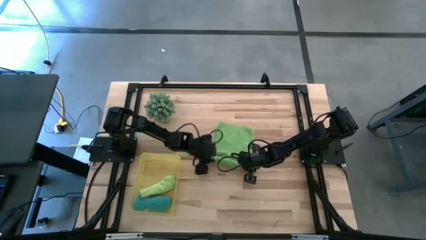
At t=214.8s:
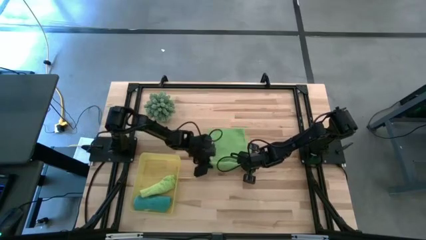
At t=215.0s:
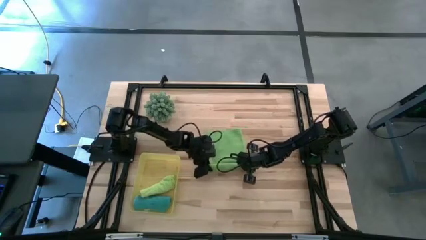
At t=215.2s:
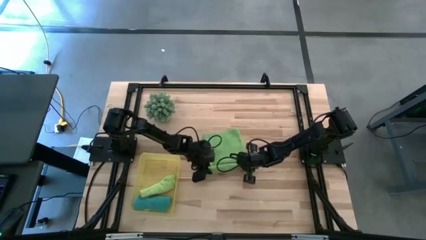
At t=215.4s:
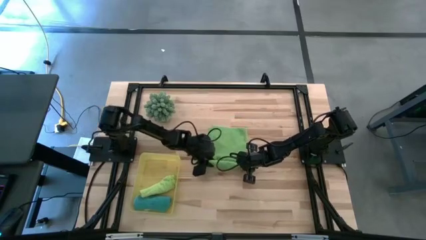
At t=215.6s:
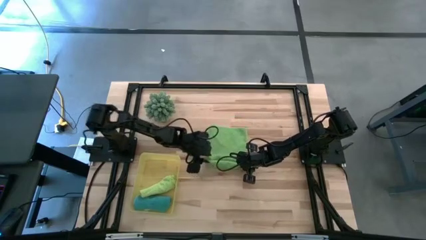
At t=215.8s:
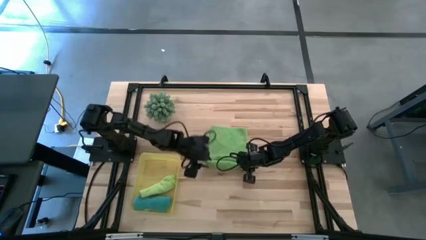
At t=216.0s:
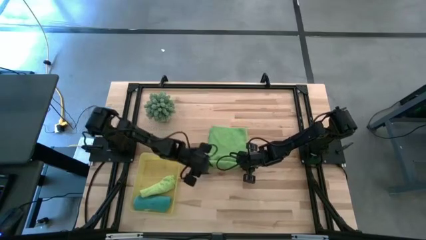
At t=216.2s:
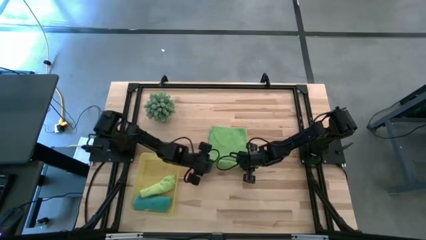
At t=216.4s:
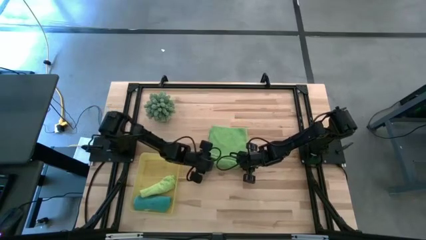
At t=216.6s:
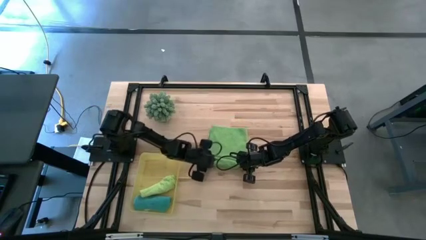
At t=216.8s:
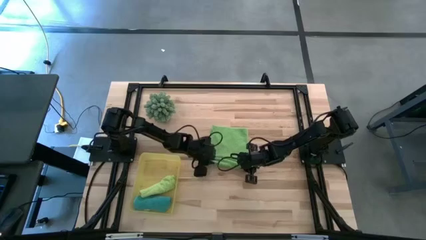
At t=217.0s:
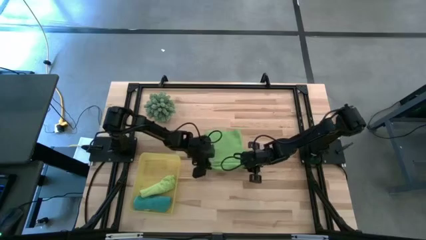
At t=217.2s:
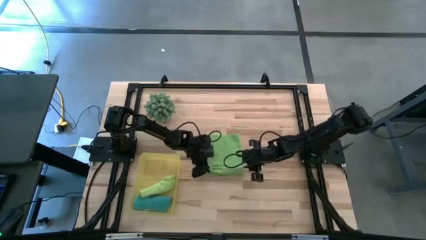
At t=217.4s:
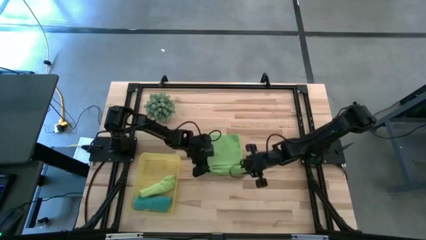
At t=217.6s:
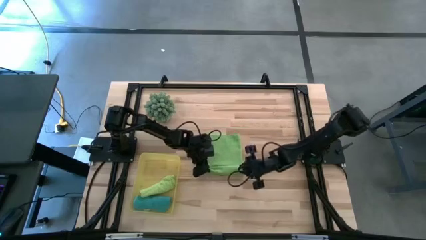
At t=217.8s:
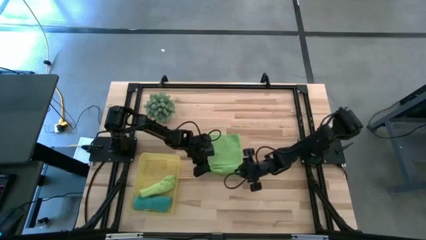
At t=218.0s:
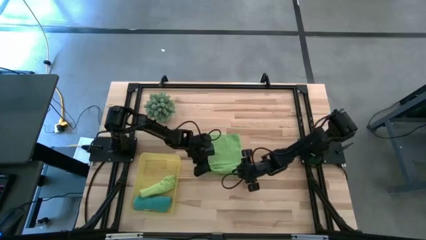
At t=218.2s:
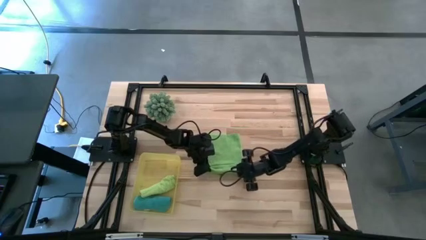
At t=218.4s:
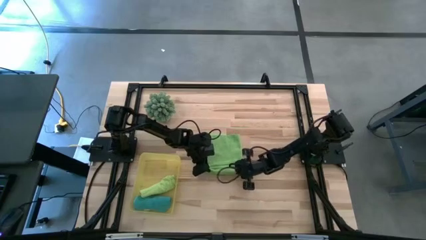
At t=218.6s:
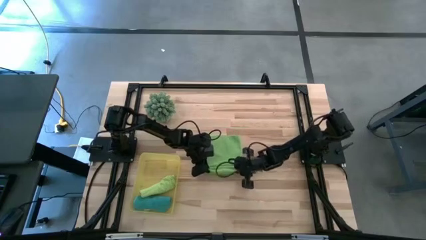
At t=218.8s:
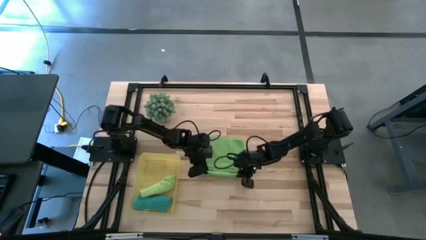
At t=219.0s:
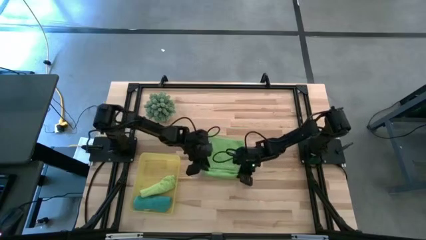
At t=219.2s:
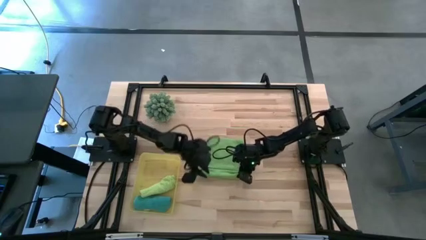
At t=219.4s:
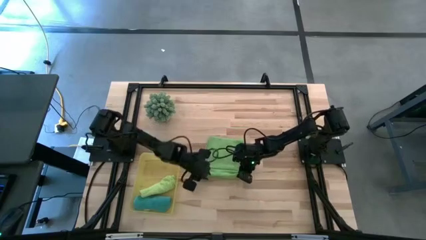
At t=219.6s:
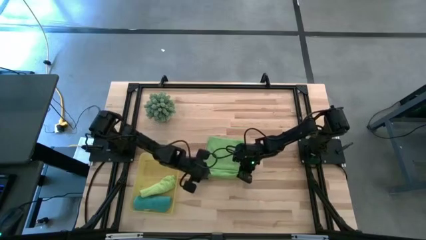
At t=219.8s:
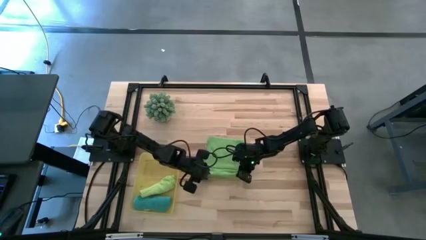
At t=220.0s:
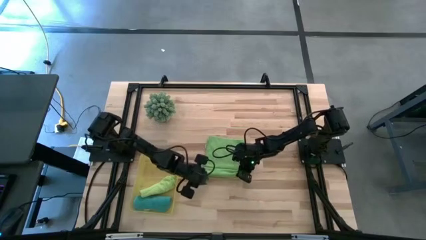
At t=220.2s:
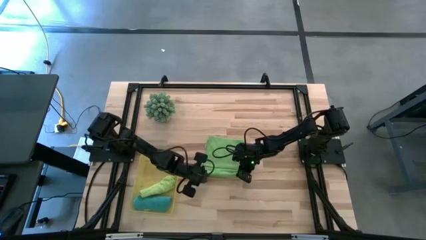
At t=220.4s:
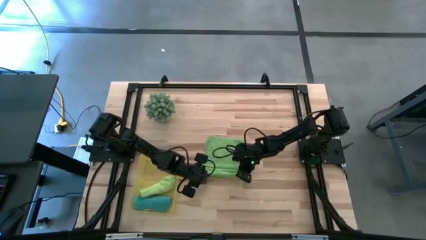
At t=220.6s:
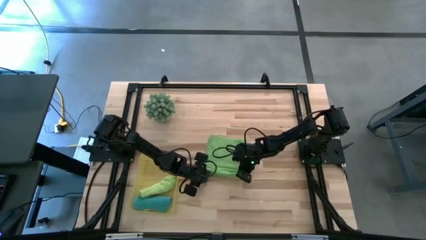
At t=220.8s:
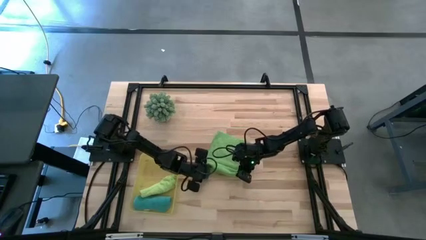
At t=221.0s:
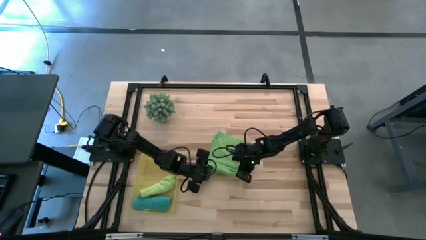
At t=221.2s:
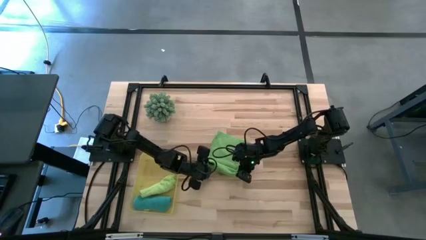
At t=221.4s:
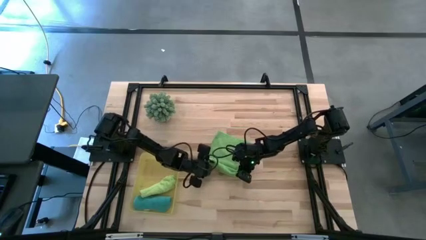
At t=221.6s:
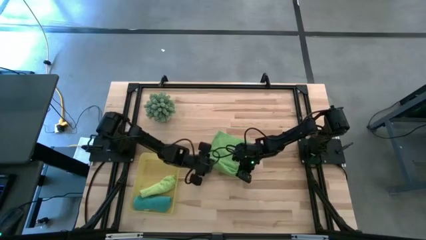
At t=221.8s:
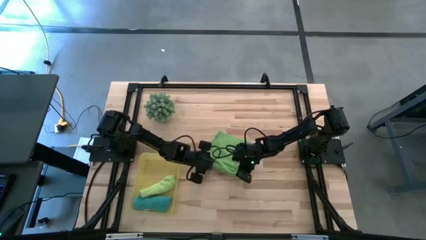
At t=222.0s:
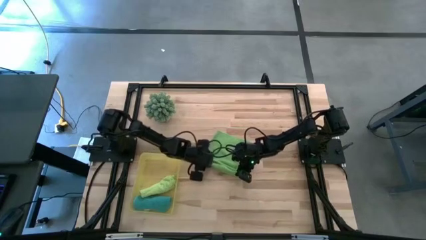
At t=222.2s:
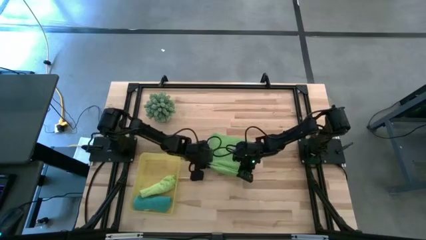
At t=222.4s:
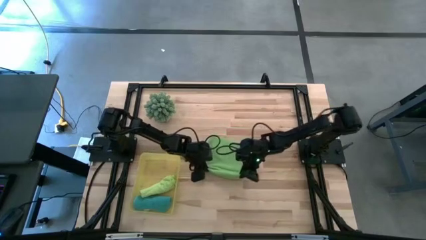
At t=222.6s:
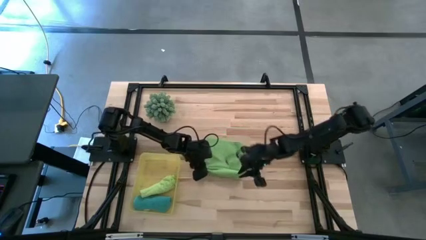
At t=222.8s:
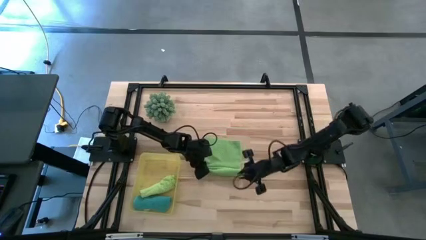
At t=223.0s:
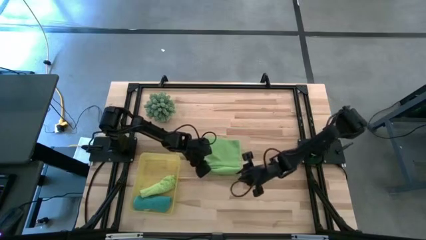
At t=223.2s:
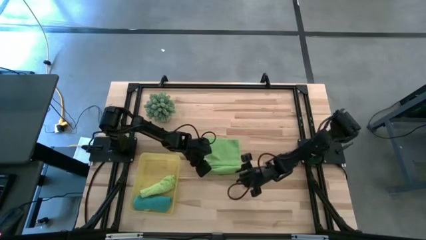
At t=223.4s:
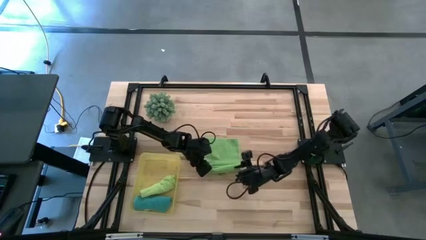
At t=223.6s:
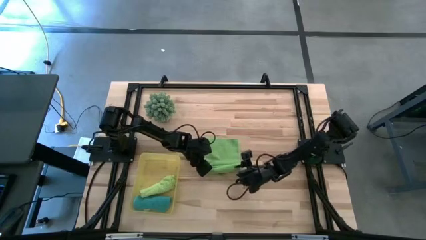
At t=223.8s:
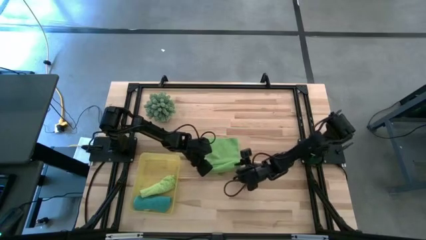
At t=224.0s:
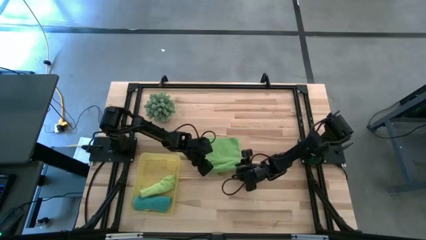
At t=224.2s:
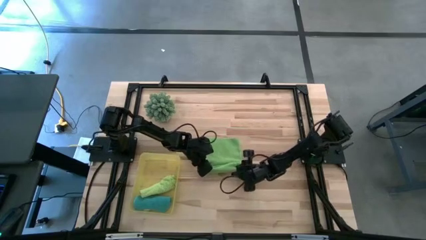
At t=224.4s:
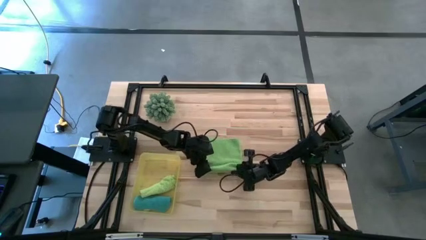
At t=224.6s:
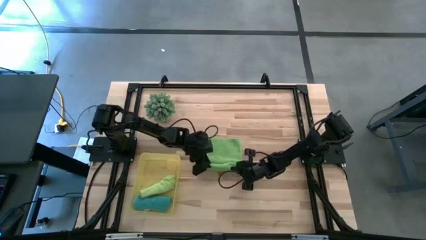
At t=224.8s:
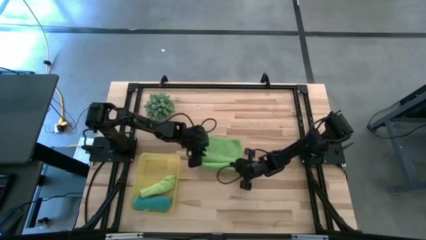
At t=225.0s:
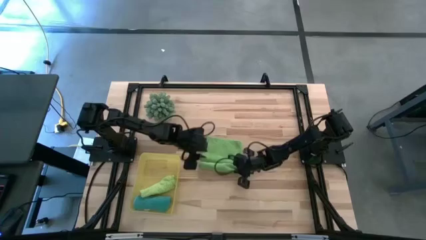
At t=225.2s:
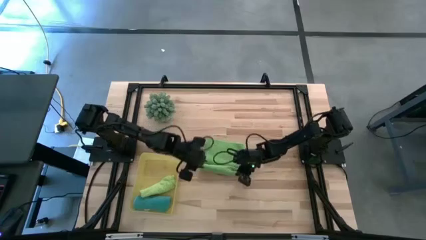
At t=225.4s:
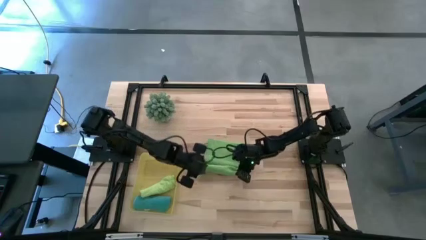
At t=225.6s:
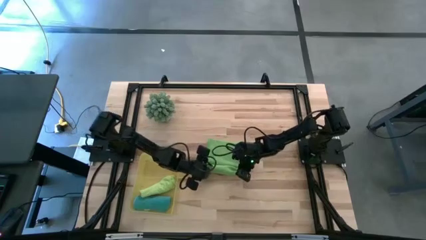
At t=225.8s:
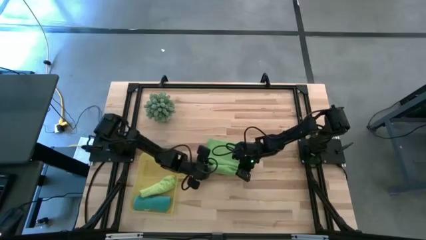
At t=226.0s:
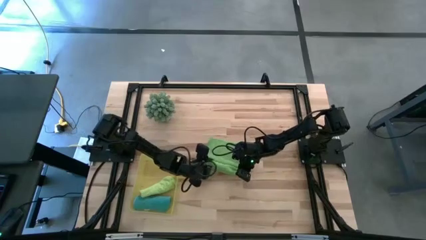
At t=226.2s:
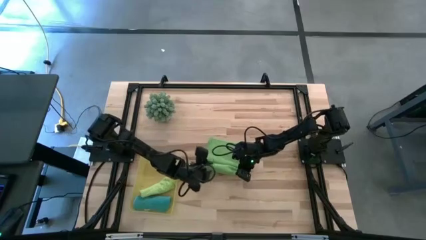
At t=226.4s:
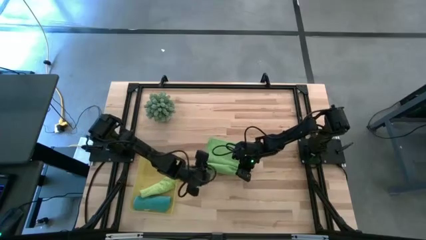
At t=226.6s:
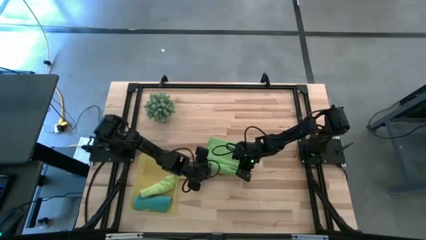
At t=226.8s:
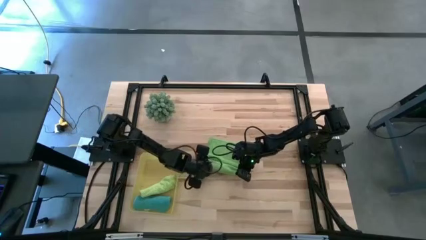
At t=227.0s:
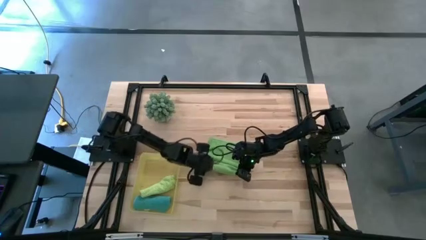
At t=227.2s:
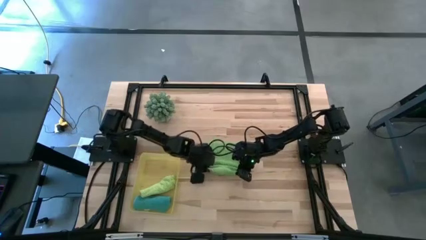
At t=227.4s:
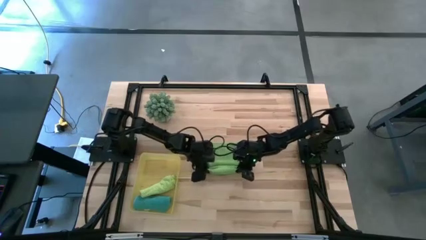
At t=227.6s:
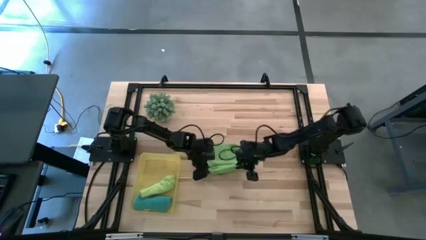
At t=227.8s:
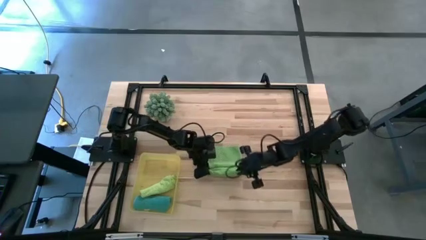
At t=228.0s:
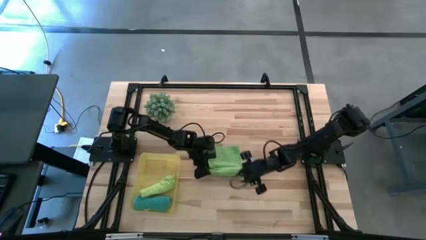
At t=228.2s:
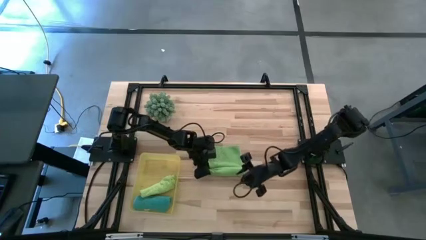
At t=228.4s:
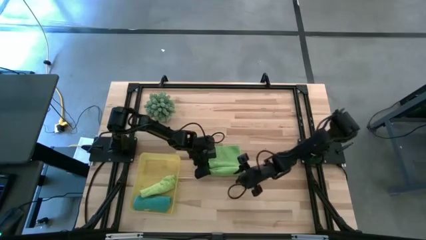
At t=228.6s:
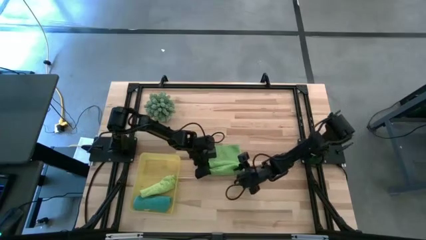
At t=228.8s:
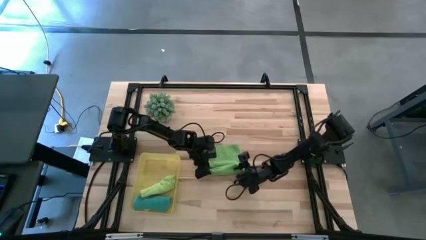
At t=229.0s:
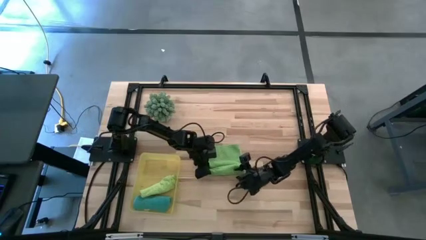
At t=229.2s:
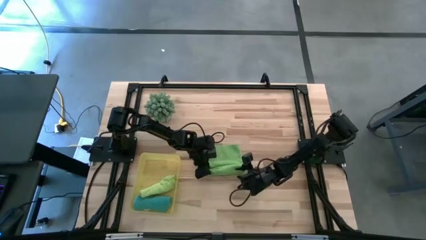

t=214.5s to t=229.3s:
Task: Roll microfiber towels into tight, uniform cylinder then place into a basket
Roll the green towel

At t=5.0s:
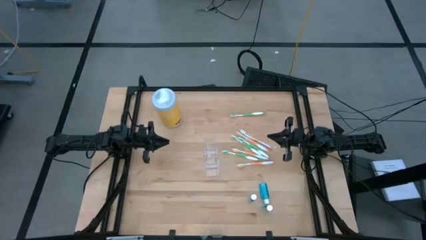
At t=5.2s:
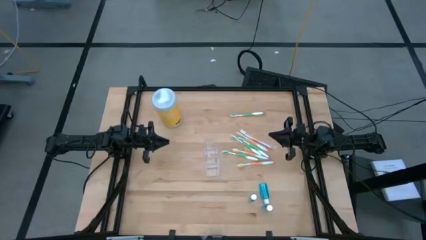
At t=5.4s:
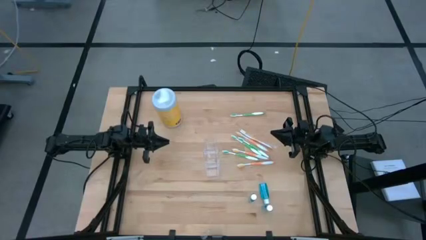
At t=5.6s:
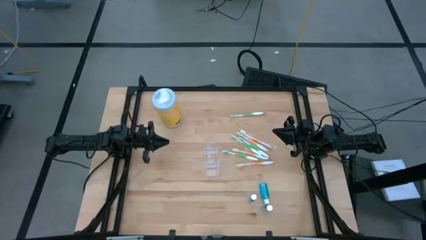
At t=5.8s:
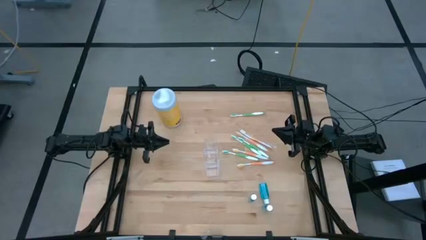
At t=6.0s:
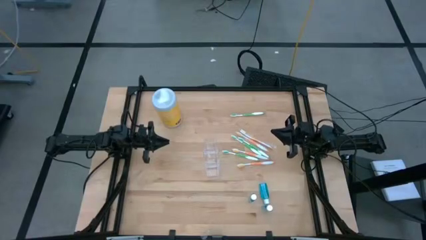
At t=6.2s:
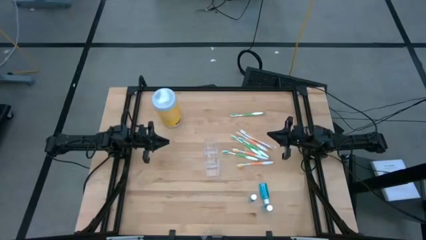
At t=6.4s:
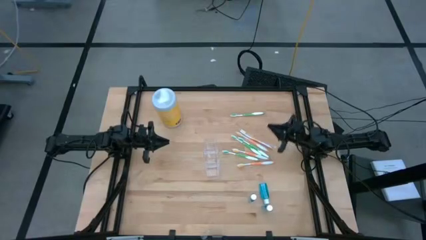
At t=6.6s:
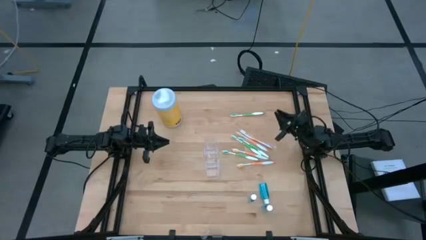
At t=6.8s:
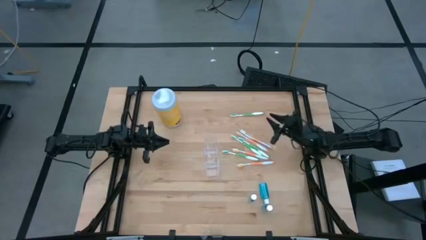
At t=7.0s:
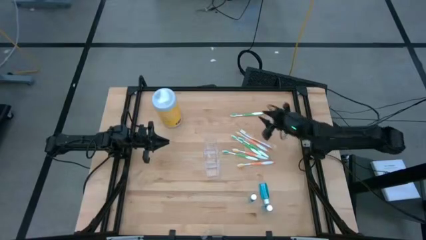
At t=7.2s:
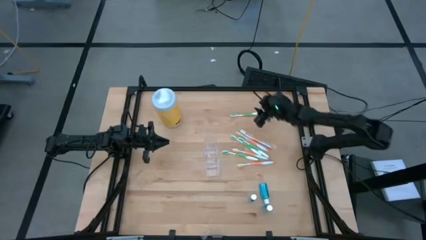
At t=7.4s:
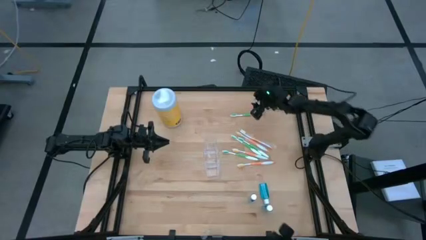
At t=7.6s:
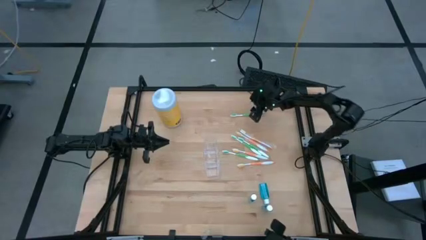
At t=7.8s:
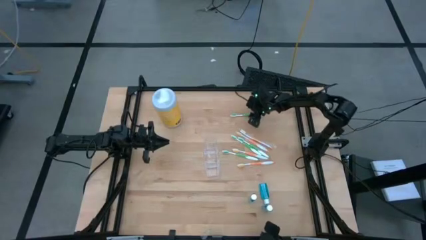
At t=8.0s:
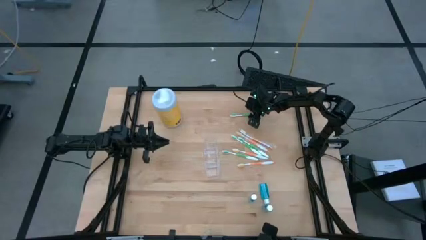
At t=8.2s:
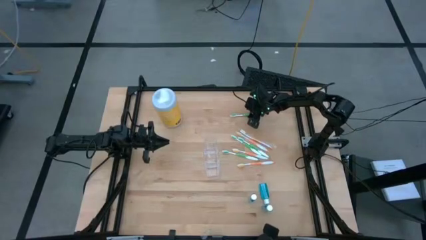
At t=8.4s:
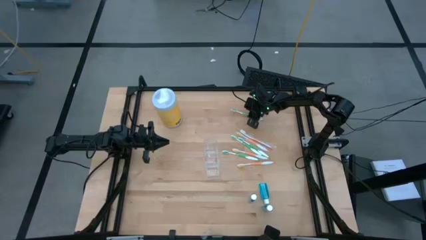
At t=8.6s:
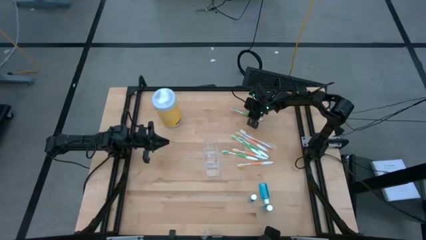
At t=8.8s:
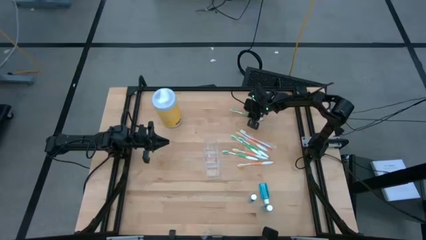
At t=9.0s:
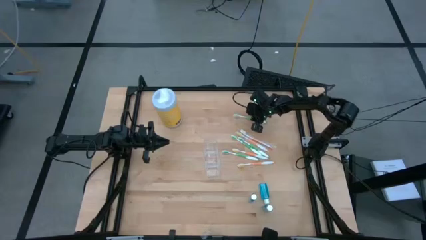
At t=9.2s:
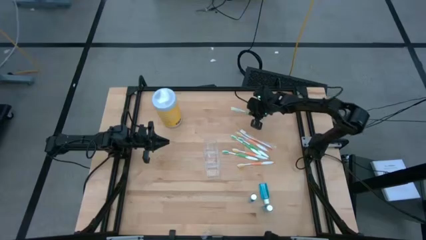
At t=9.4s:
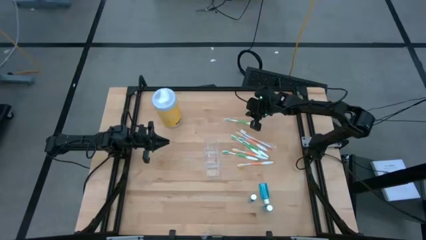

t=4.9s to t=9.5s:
Task: Pick & Place toothbrushing station
Put the green toothbrush into the transparent organizer
